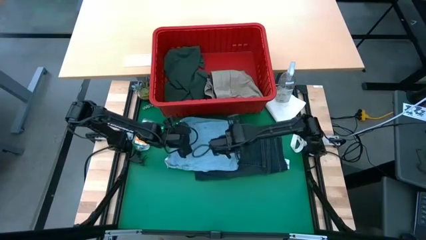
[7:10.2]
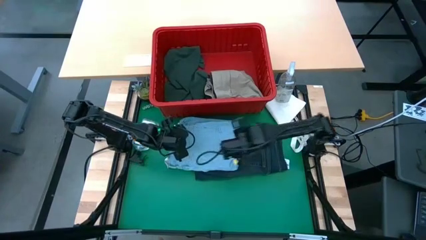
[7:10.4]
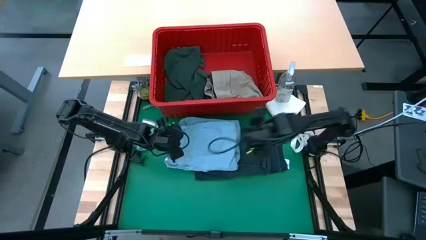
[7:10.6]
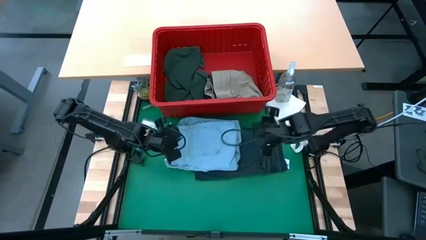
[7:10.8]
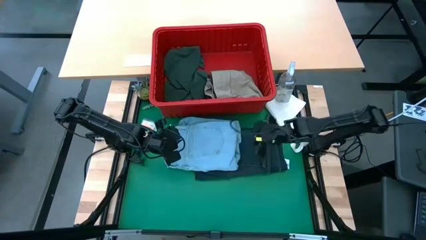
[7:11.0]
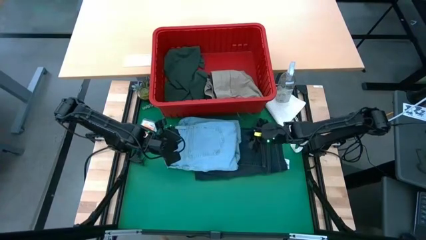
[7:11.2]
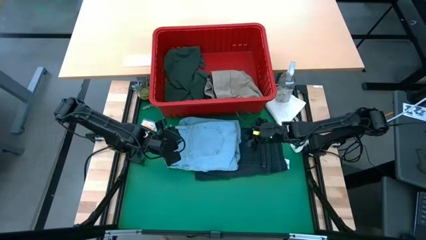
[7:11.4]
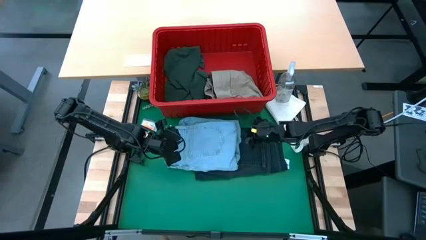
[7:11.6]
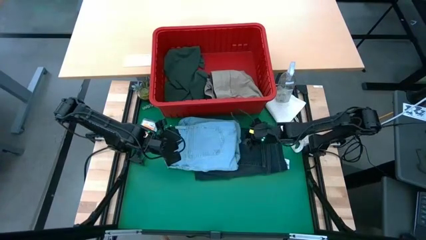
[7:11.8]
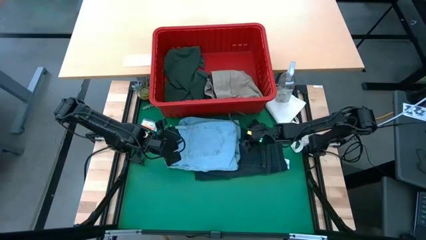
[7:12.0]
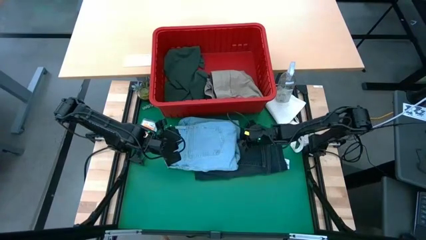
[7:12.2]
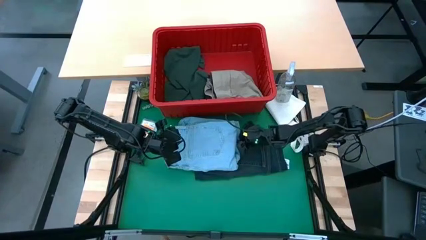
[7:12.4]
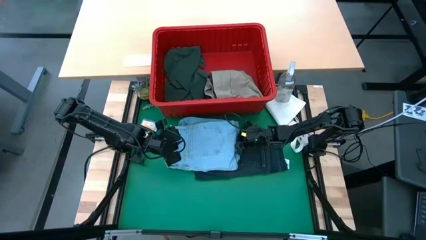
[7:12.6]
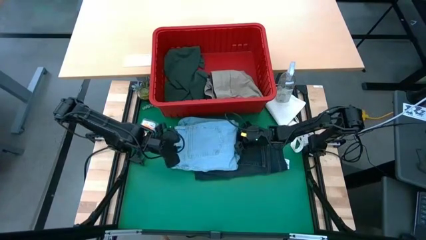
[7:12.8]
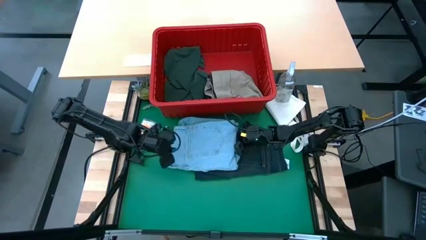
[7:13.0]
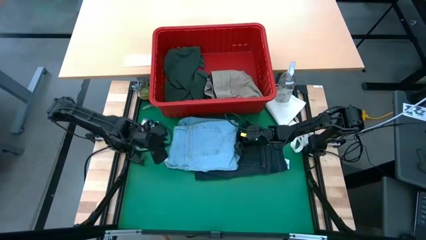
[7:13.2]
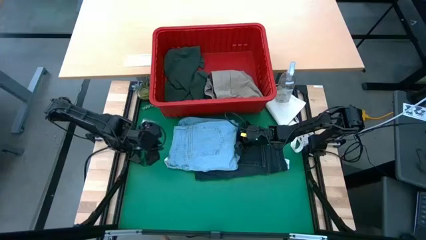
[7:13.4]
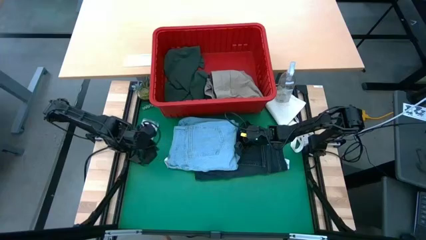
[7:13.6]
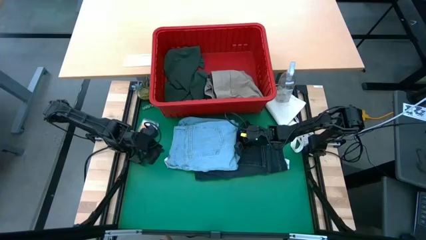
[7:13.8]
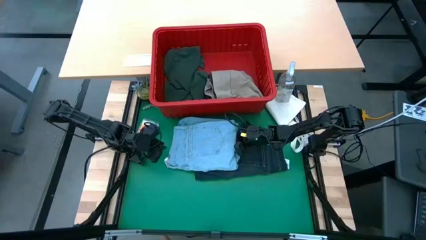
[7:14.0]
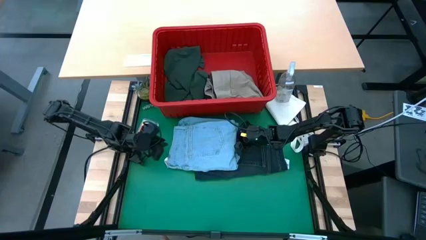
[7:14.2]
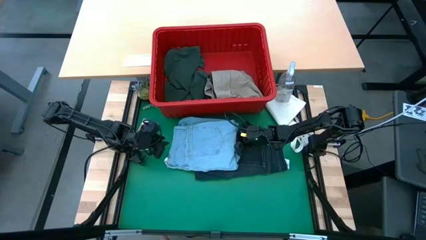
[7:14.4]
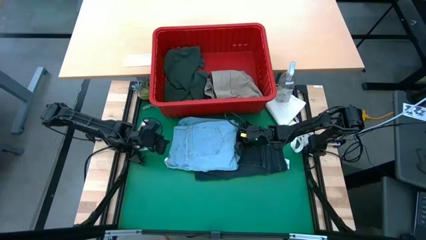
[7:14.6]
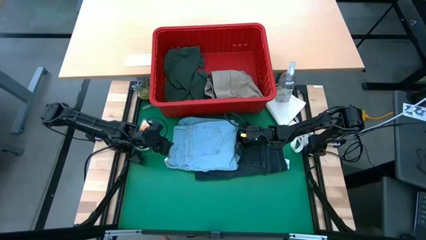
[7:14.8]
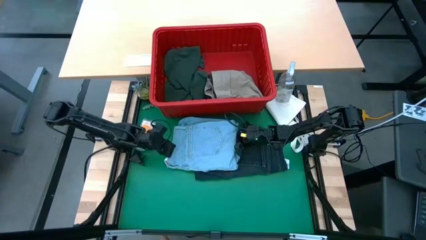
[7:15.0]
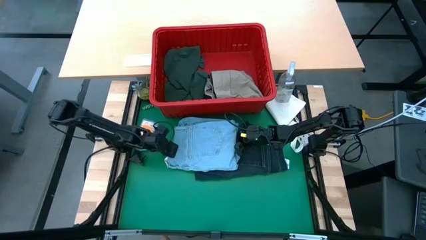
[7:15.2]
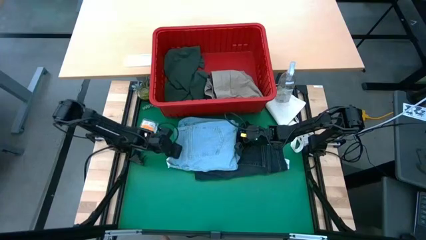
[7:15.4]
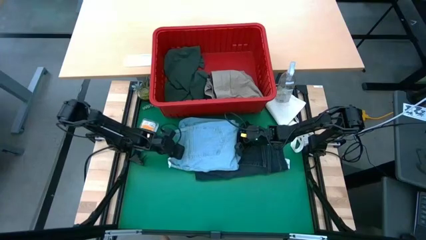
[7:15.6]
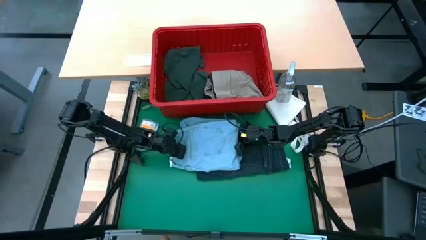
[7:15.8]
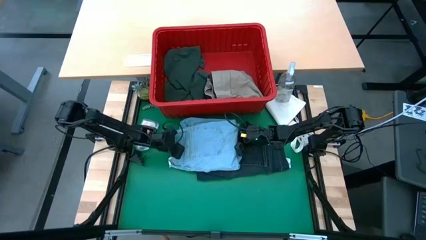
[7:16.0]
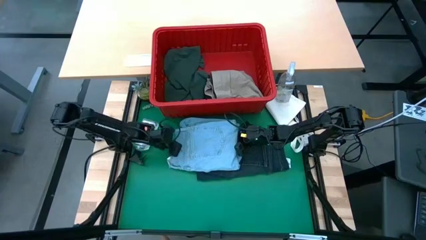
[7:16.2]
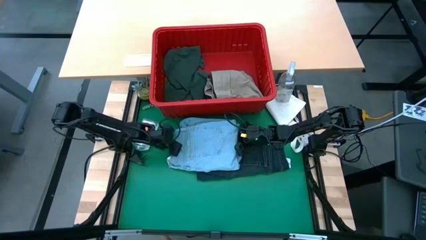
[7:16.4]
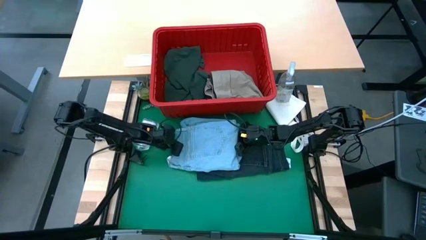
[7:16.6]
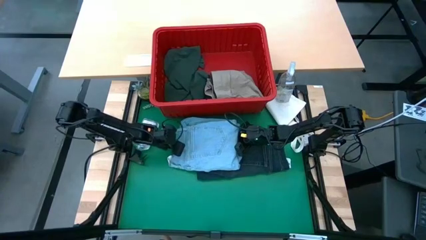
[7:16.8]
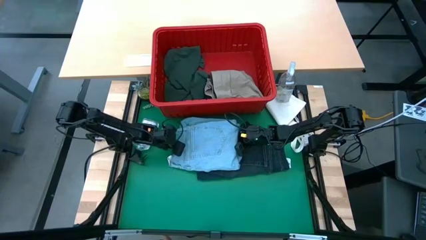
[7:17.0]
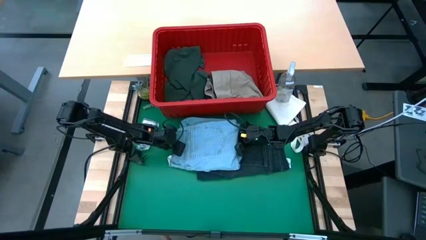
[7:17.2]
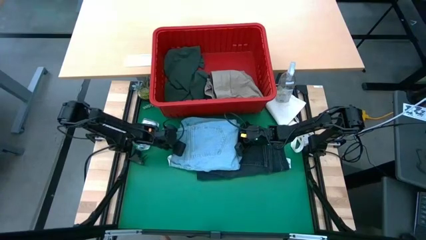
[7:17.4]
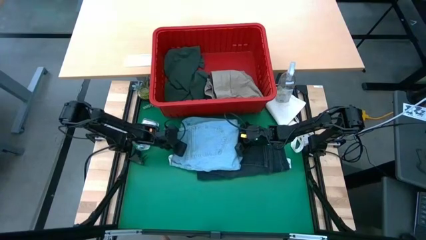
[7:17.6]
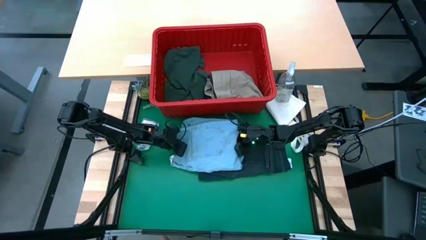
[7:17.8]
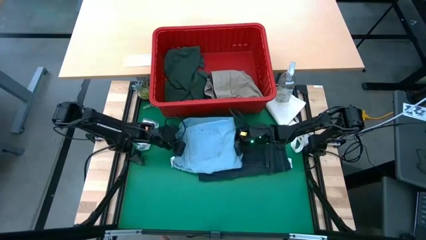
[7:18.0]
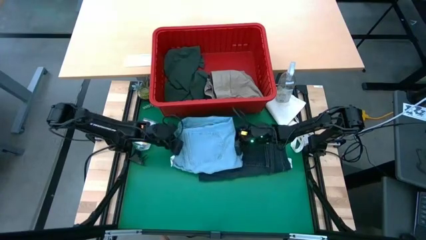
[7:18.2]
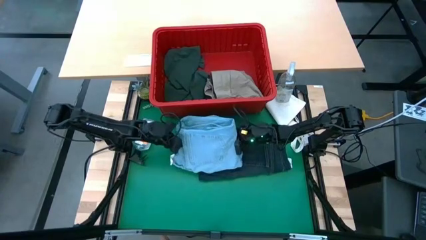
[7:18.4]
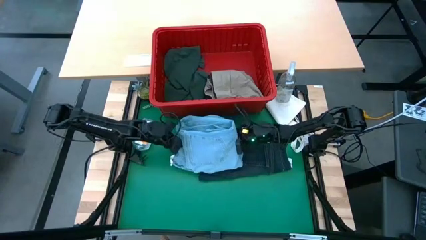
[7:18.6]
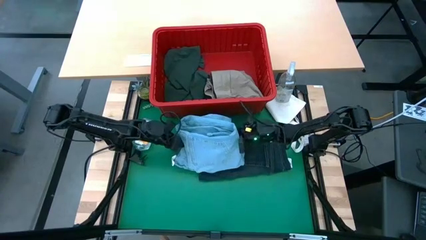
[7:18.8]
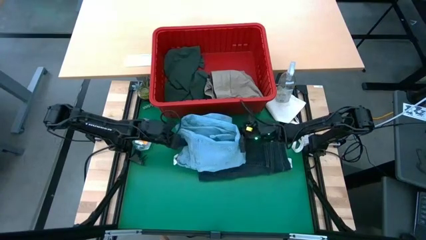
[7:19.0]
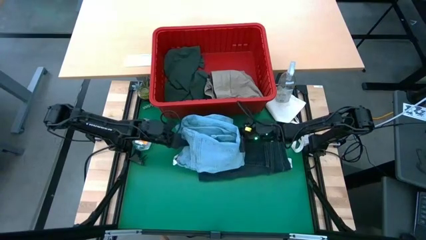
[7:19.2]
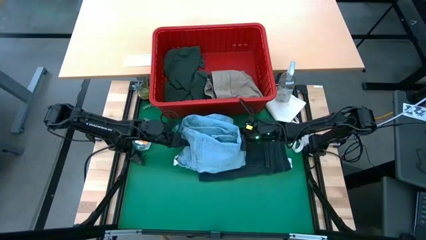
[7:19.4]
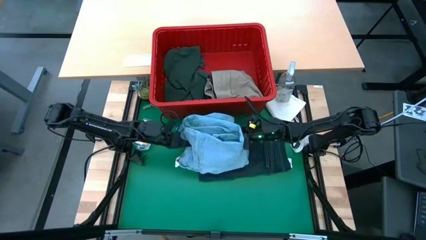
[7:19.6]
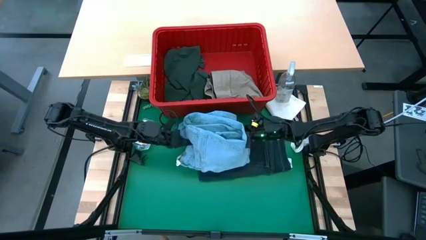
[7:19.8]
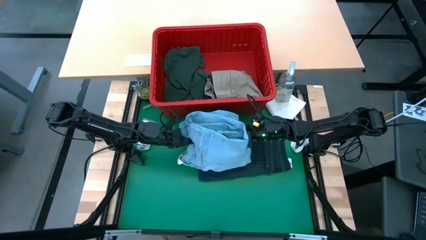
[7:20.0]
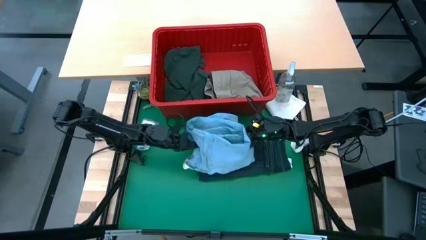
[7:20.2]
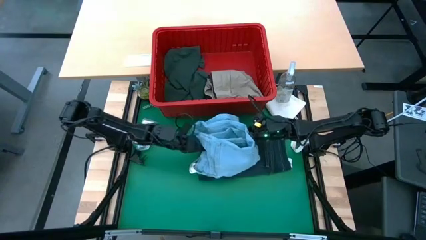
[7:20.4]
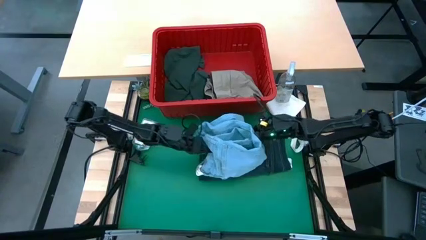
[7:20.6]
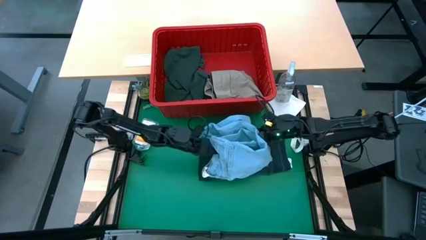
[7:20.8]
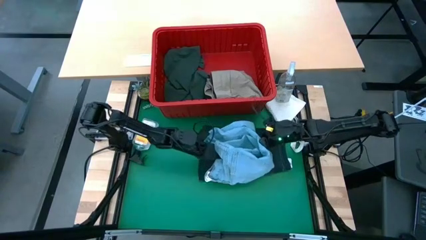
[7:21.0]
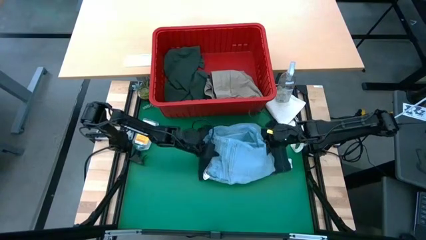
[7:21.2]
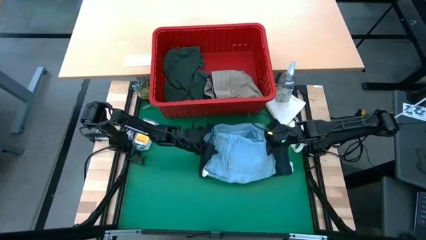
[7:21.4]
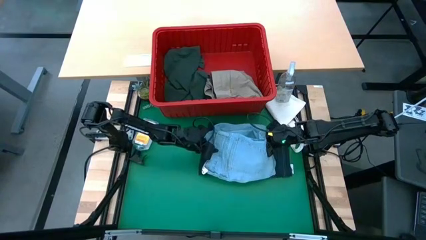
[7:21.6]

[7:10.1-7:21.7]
Task: Fold laundry
Stack the light blue jeans on top of the dark blue jeans

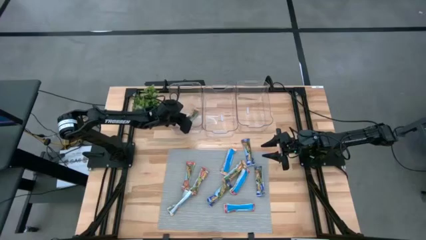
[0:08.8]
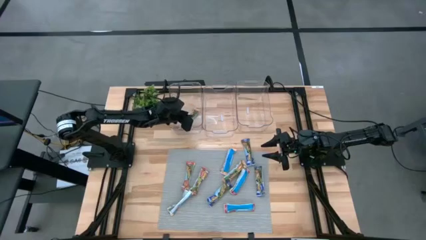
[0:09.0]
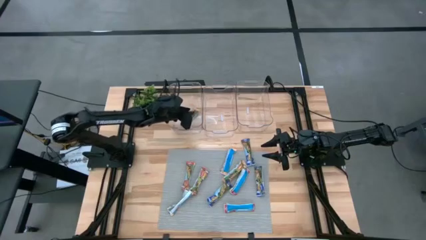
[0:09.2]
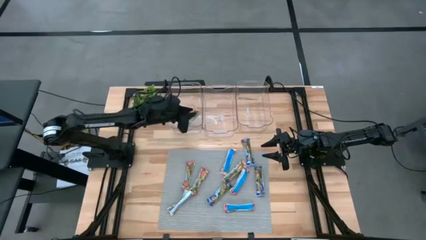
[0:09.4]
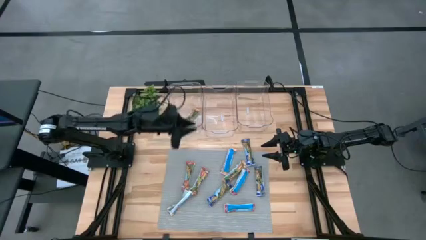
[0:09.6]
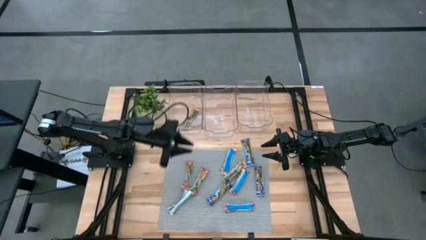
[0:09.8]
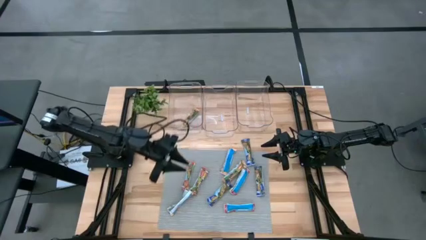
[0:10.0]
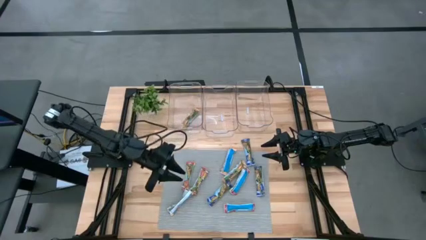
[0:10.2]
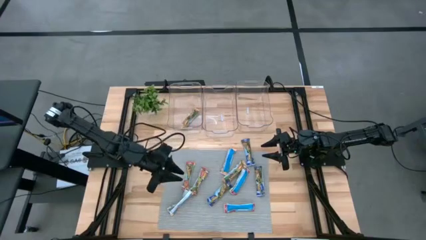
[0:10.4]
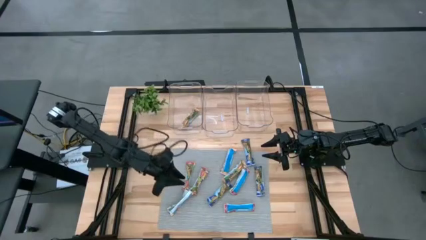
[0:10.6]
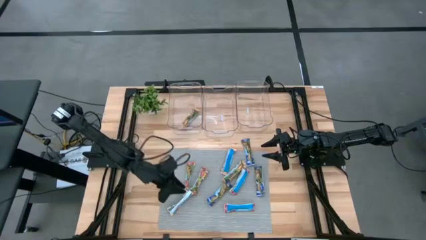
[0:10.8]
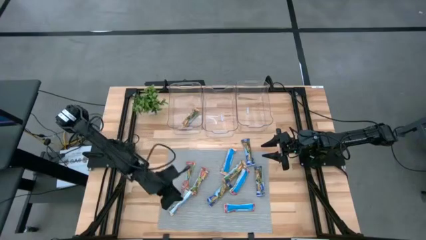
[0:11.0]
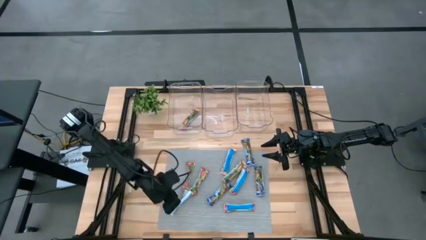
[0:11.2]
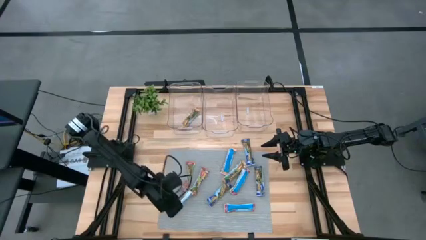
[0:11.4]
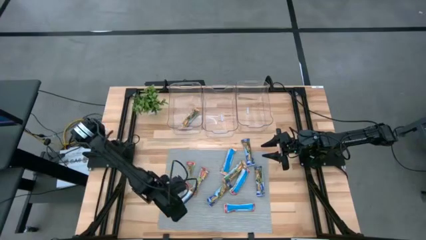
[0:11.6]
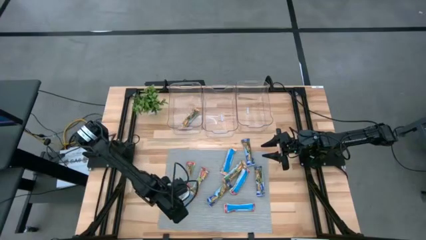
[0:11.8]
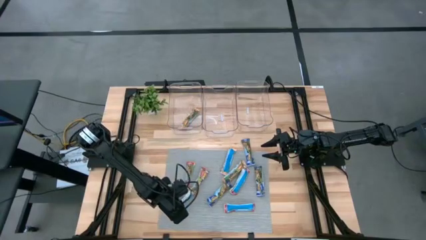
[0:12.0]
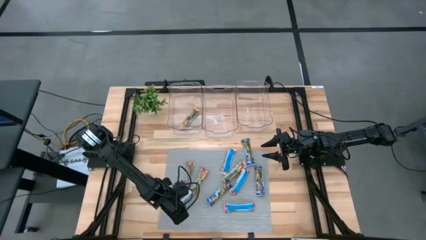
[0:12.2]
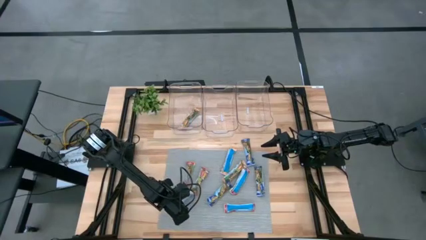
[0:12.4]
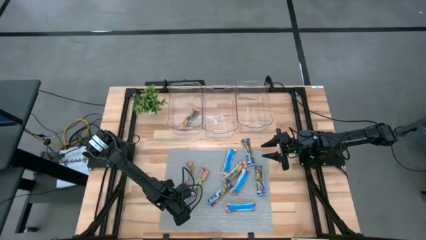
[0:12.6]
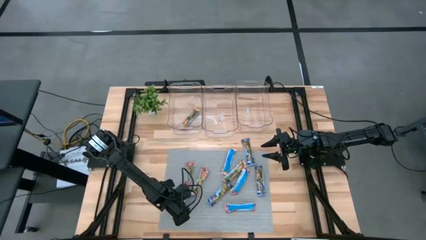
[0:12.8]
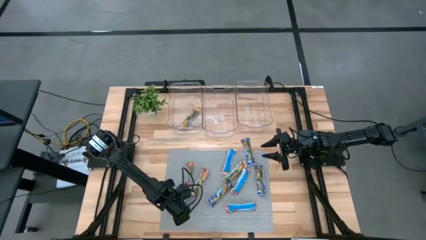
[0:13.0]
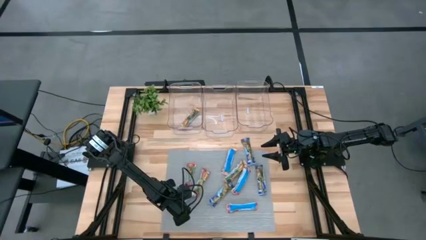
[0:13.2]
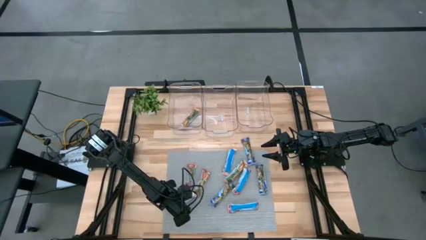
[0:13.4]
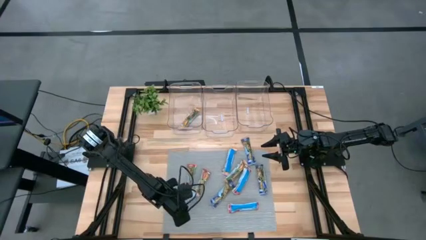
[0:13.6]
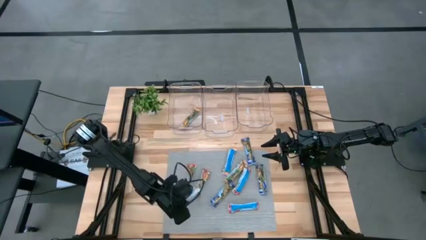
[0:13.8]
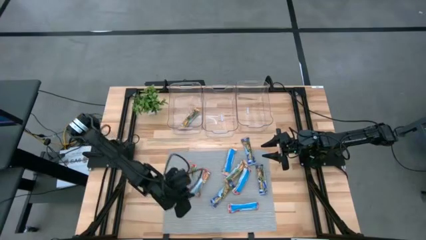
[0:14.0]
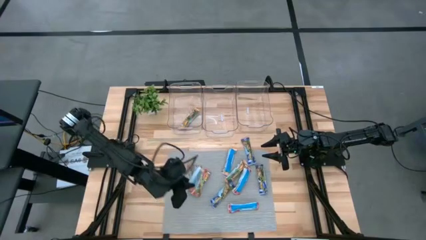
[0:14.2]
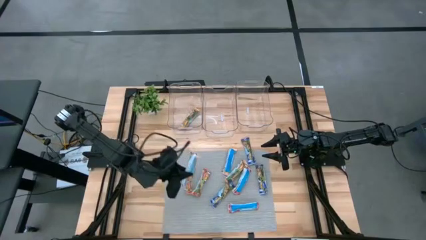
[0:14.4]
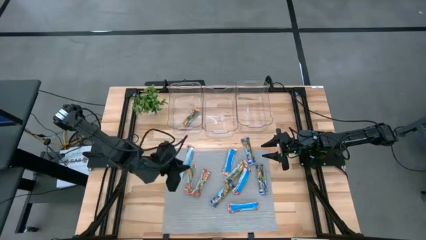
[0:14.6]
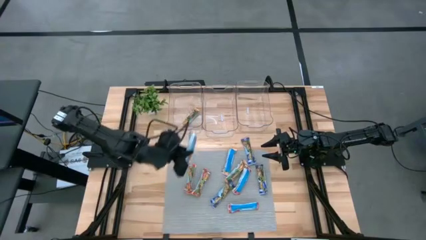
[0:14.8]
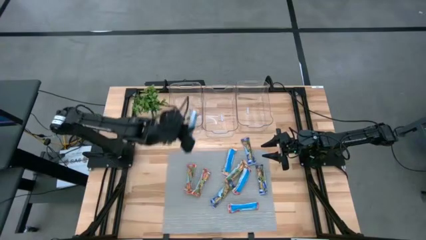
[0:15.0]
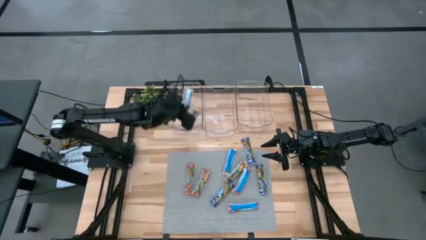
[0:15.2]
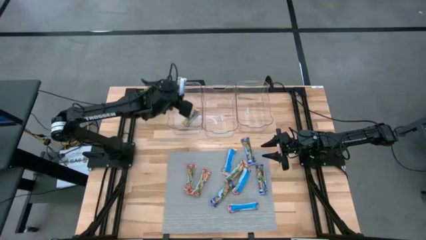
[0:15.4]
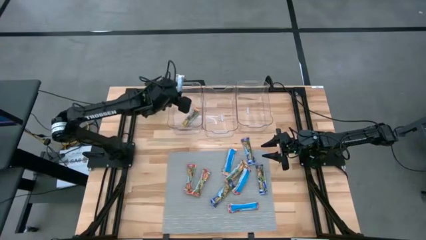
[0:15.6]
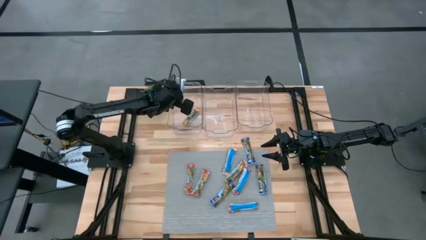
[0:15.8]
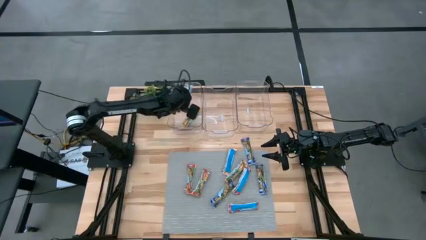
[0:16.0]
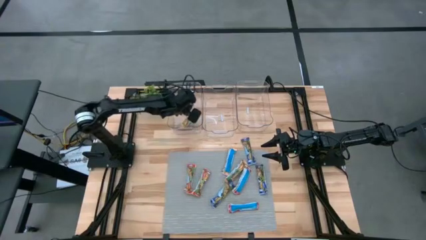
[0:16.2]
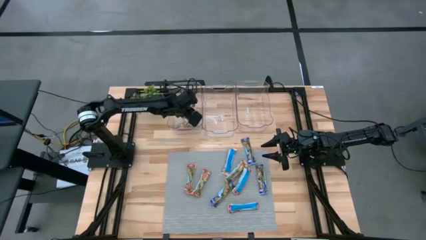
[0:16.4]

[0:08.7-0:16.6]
Task: Pick and place Granola Bars by type
Put the orange granola bar into the left transparent bin
